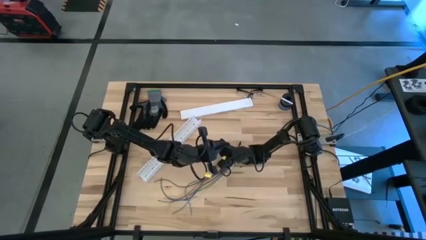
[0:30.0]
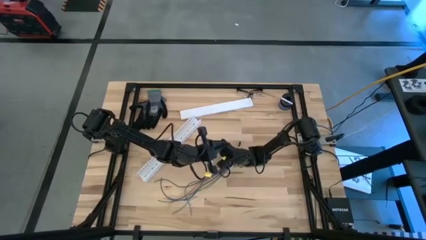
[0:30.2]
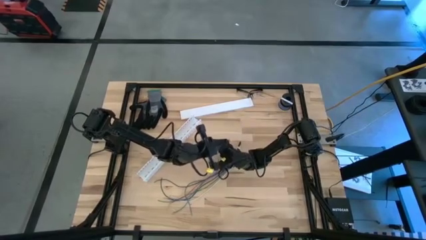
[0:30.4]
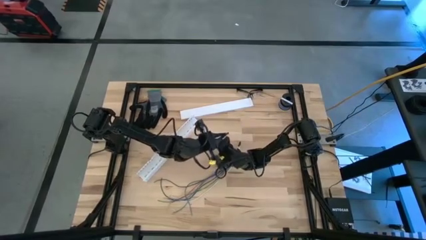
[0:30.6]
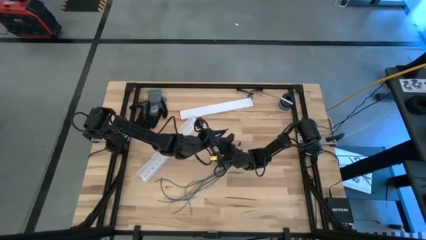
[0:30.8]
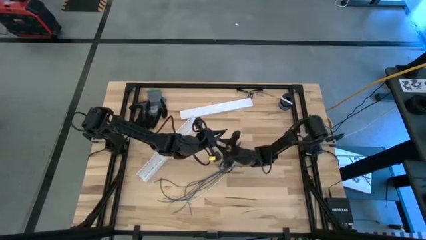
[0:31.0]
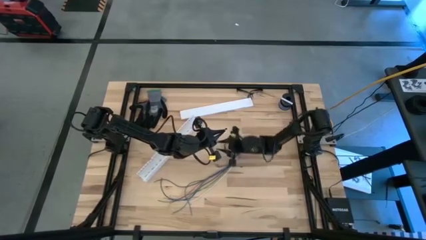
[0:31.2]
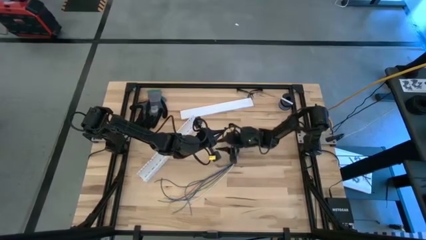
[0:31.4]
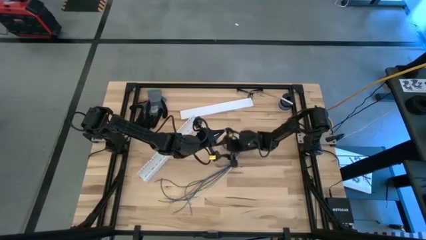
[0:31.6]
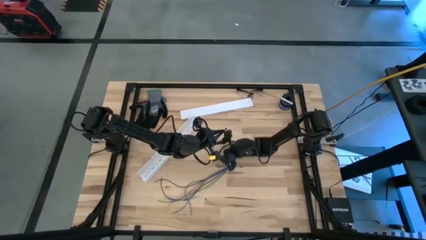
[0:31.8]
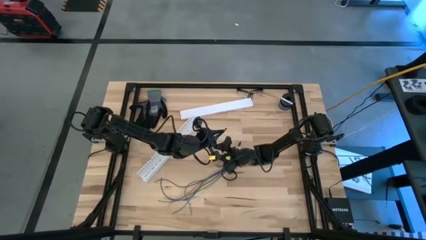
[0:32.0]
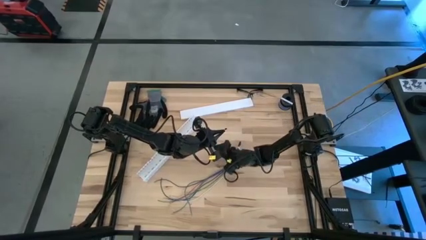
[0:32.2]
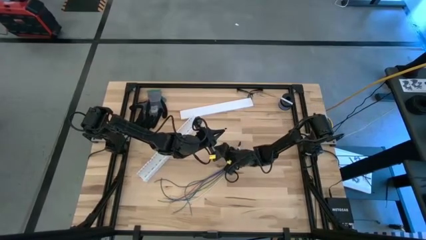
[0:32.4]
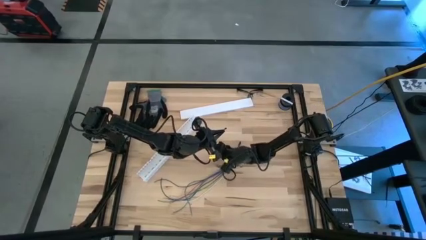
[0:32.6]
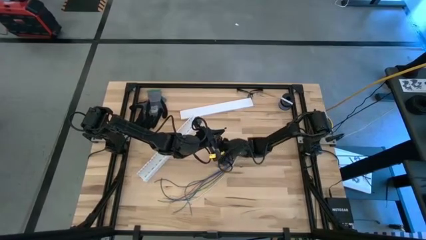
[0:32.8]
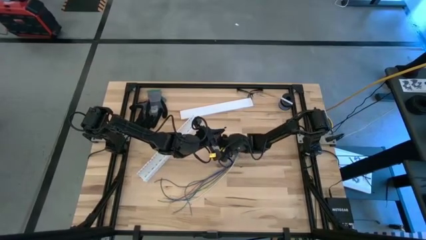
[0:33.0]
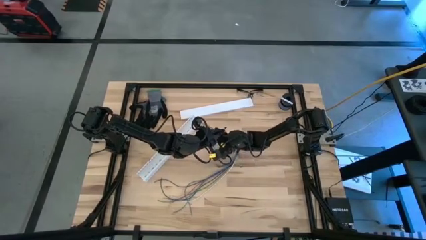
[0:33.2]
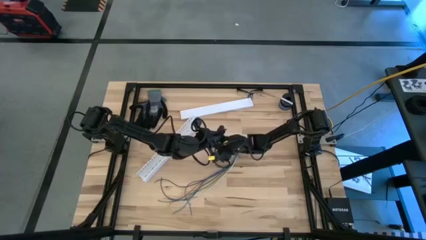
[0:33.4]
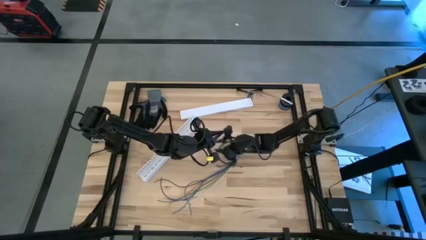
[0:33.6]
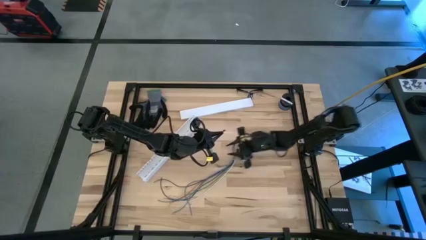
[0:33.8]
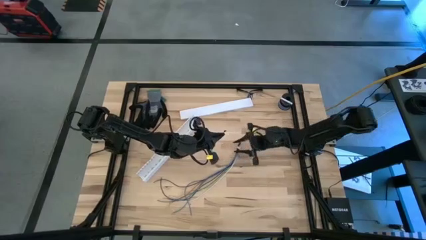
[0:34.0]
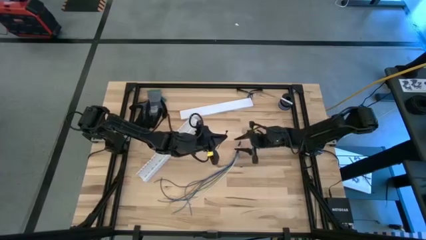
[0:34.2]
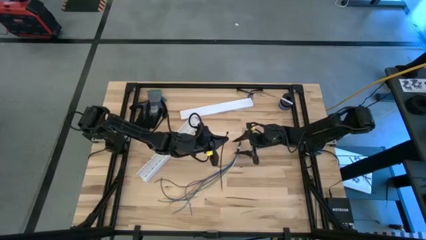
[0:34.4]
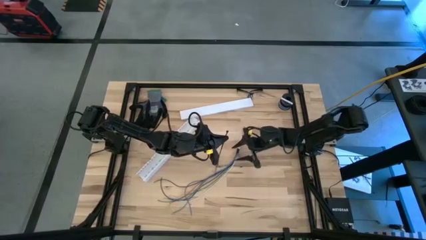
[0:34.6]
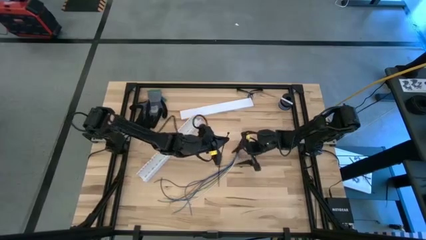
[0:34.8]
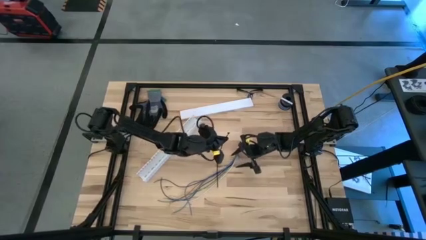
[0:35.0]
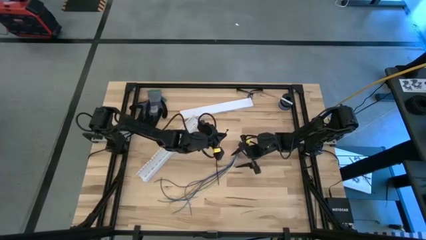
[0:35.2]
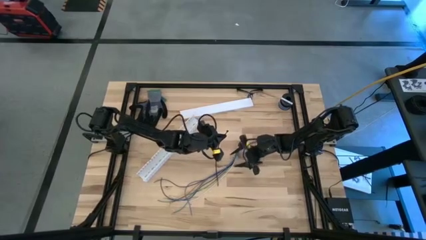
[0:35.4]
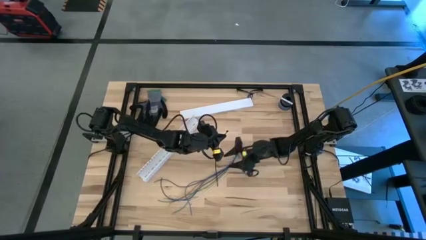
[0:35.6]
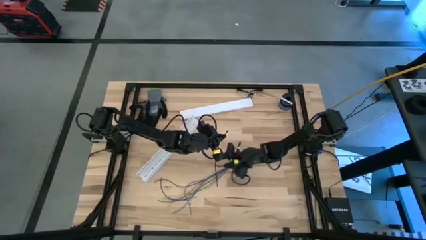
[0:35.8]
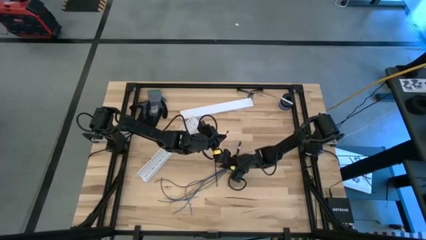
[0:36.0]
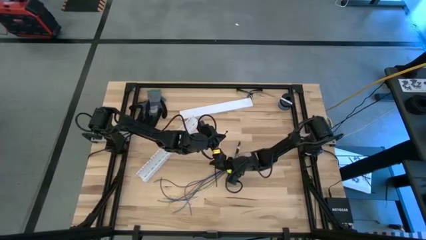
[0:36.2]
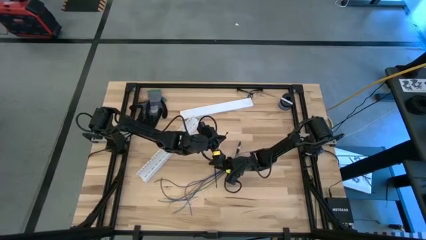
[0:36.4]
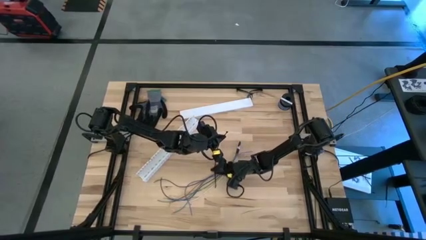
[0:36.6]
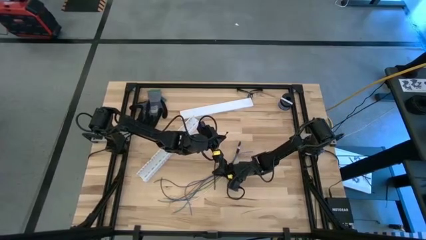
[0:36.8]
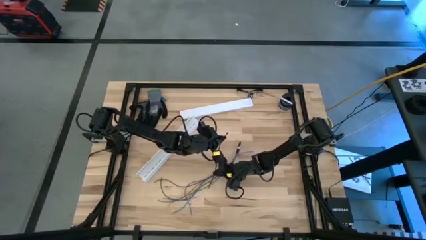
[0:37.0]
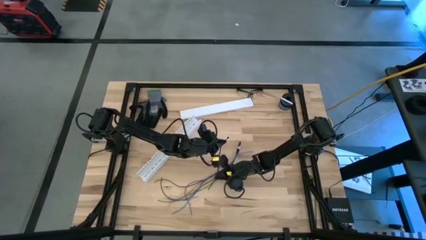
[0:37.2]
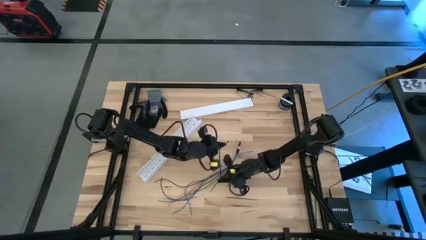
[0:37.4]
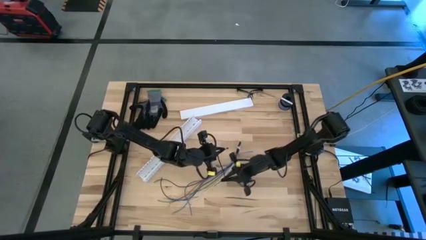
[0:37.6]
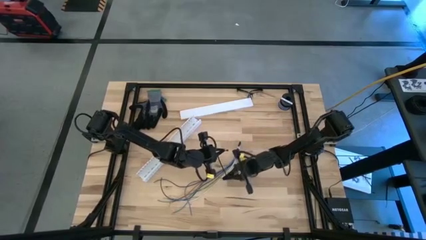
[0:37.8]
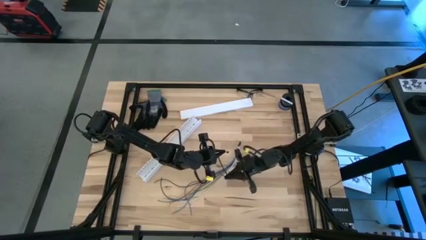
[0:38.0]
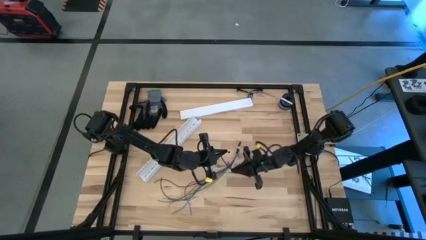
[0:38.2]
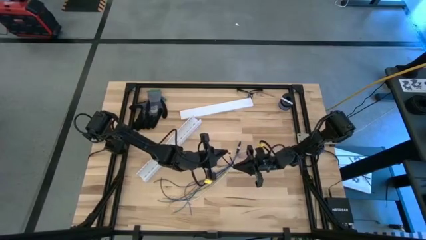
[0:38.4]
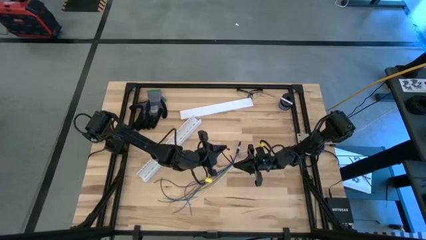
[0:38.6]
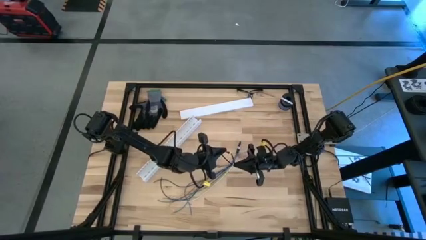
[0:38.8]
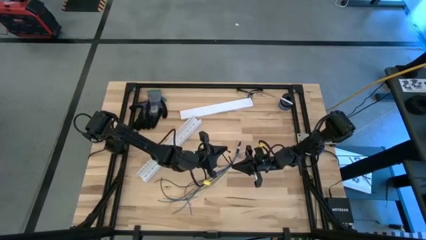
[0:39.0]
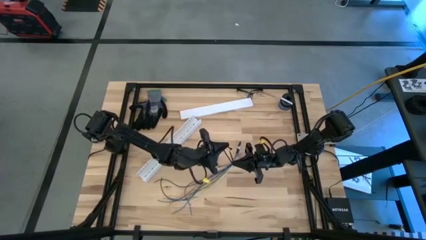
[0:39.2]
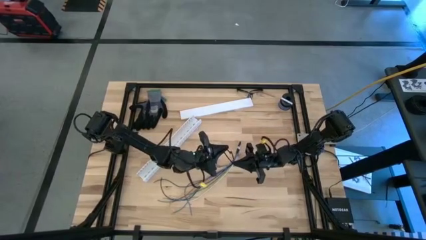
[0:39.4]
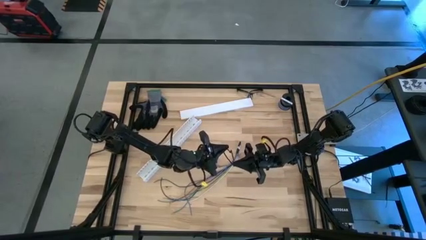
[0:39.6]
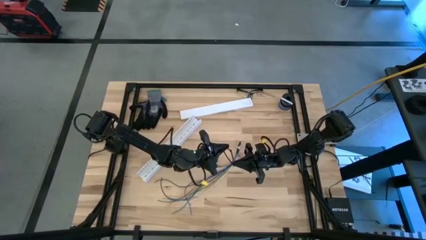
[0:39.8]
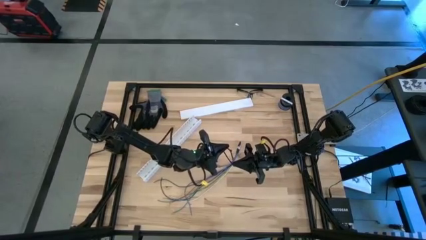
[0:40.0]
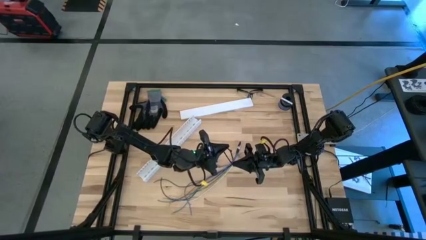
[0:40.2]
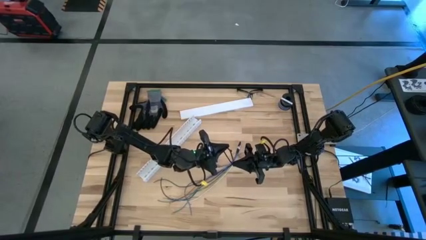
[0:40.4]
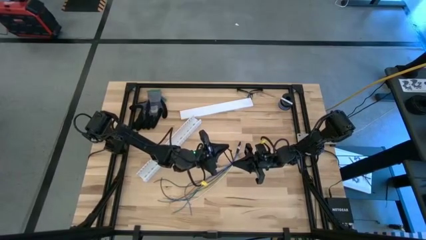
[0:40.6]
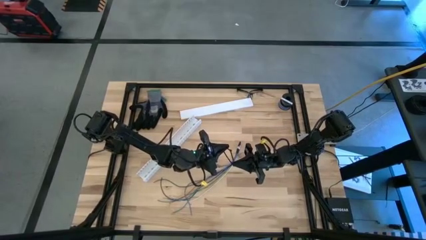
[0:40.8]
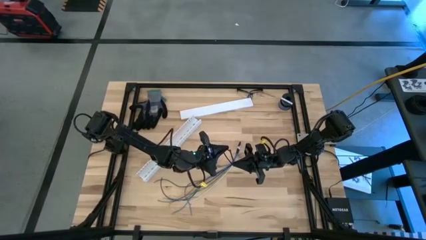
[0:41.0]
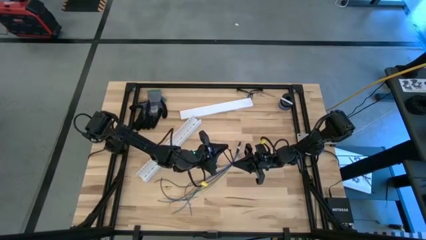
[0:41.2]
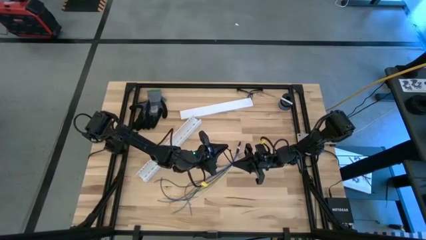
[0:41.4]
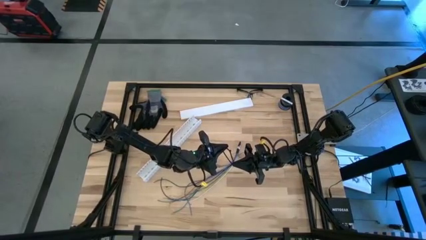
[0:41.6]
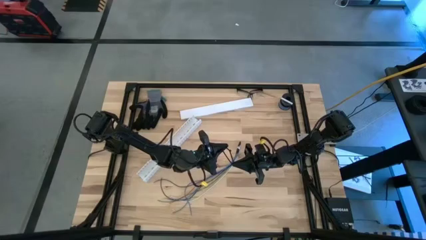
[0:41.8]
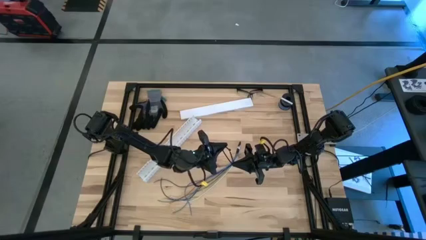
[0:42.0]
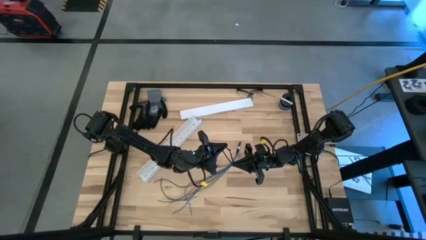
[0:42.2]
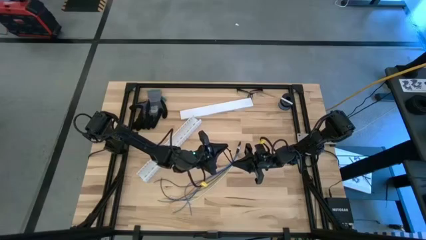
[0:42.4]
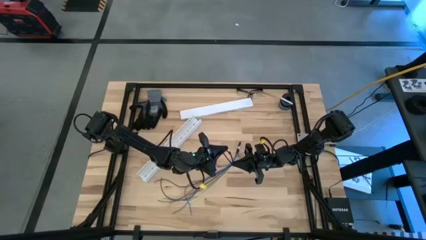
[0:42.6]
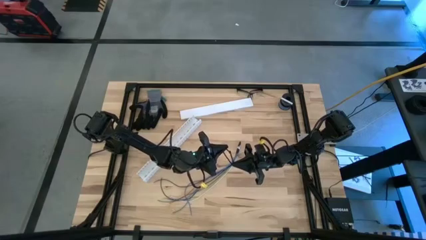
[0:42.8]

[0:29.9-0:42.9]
Task: Ziptie cables
Wrap the zip tie on the cables

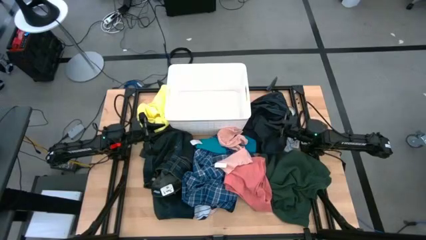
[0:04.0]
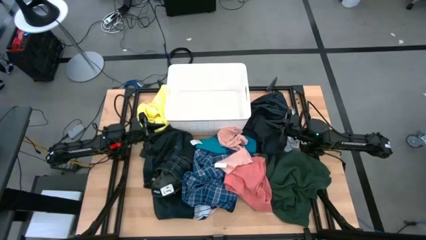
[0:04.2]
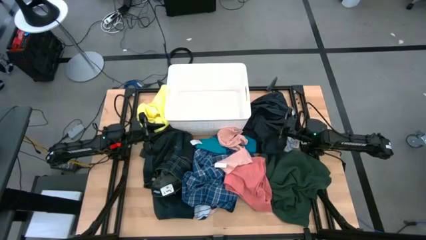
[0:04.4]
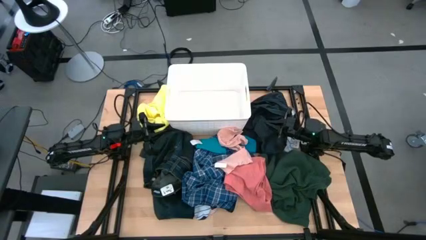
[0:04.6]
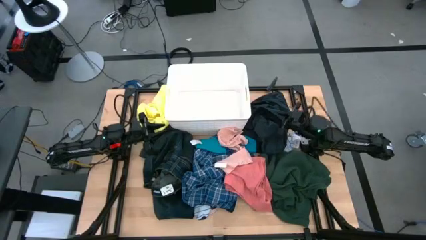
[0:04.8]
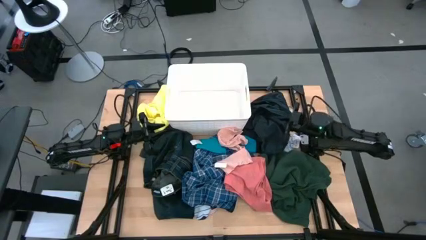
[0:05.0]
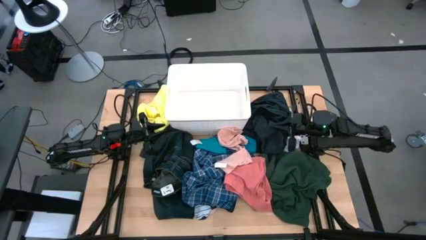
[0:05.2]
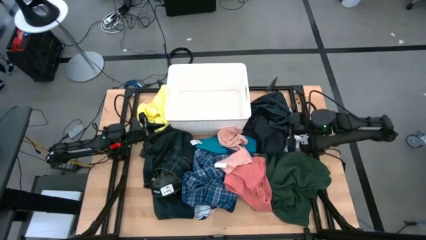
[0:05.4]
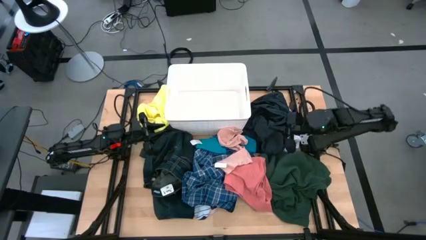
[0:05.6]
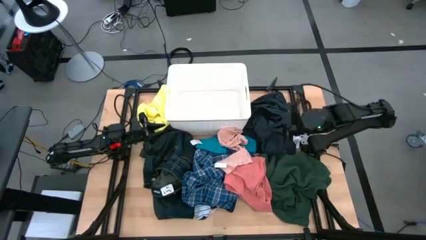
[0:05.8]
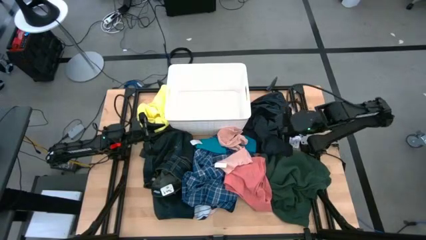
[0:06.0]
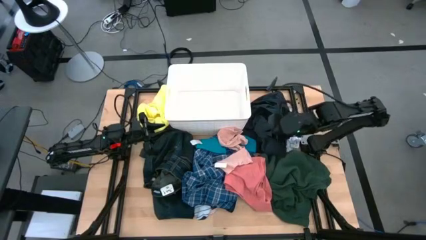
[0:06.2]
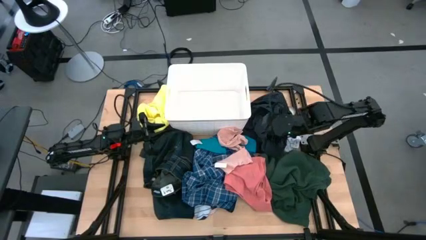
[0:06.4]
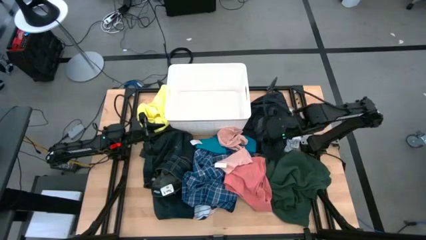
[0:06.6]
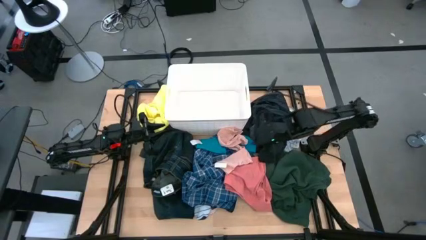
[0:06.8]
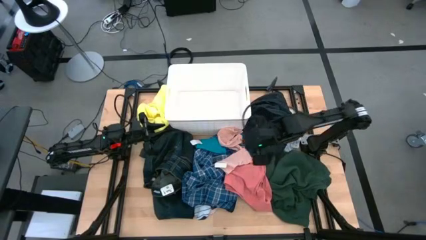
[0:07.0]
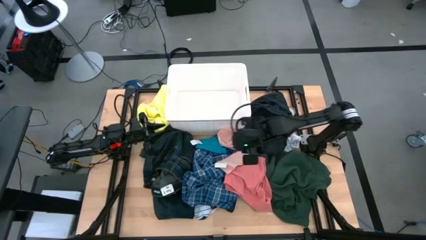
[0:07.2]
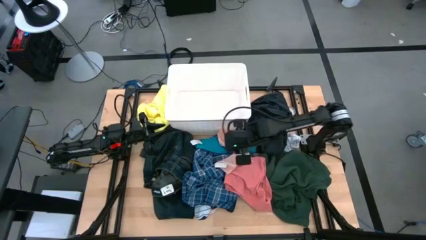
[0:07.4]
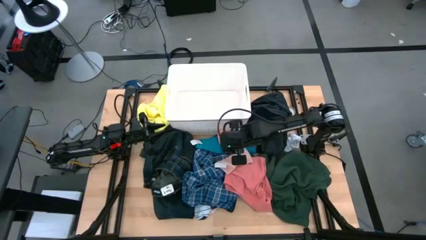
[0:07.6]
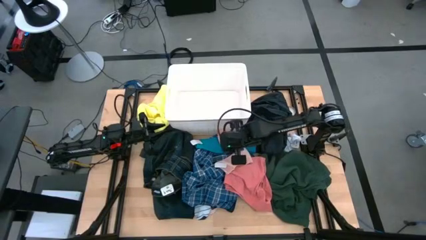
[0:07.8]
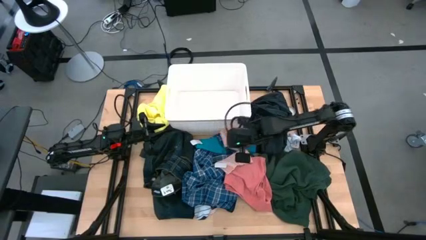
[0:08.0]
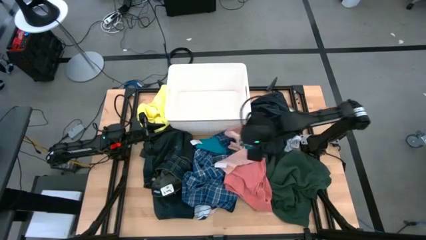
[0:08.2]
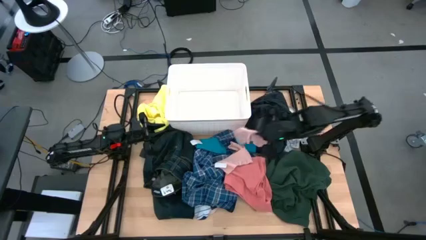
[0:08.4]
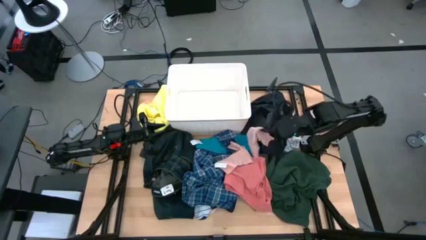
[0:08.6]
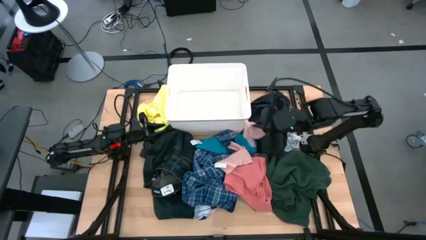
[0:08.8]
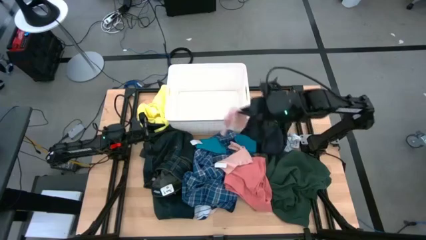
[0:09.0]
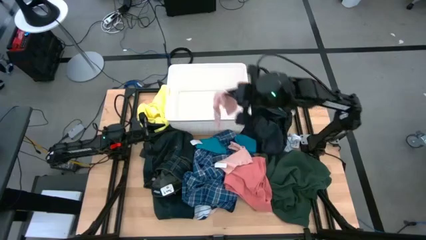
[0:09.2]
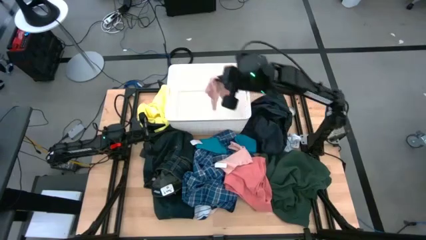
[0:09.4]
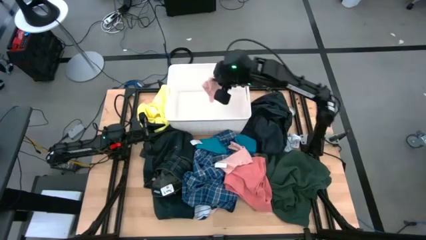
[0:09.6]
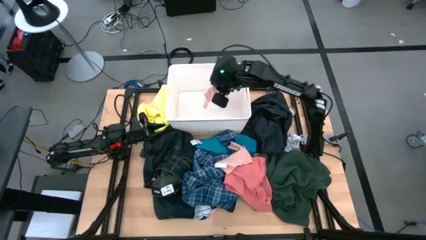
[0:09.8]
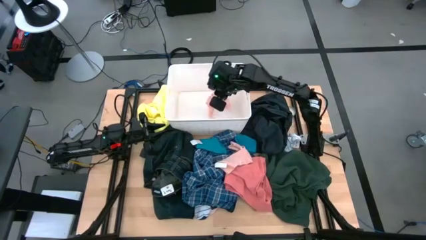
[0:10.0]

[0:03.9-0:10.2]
Task: Sort clothes
Put the top pink sock into the laundry organizer
